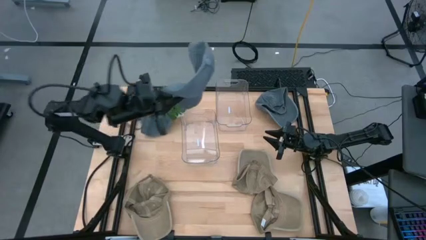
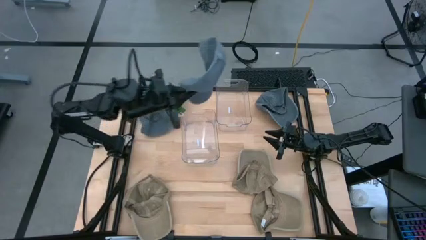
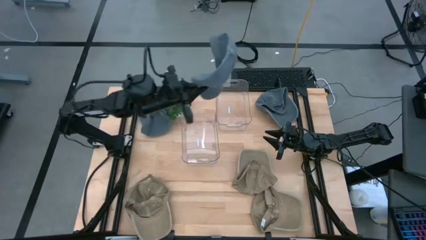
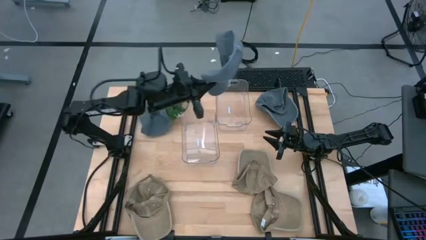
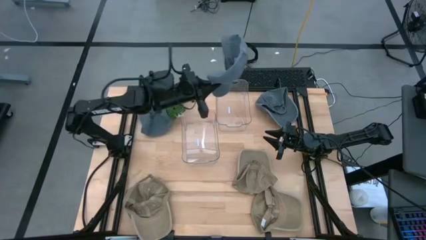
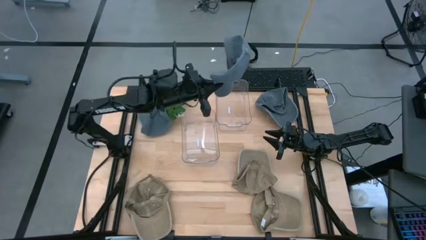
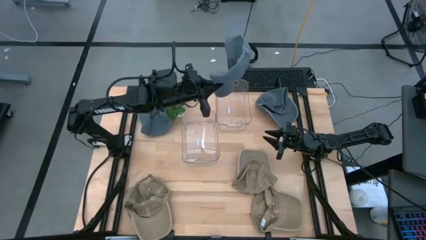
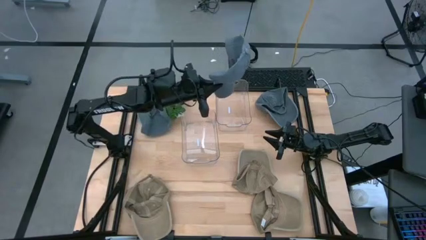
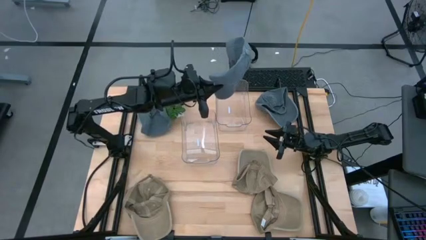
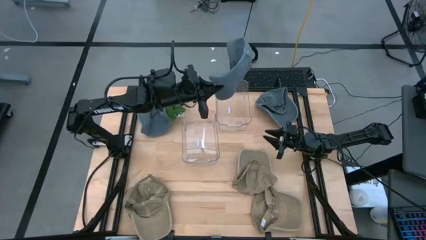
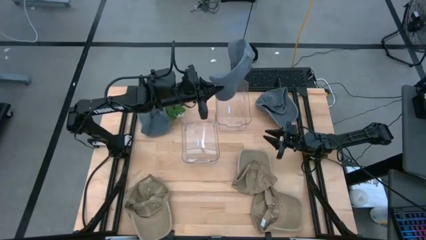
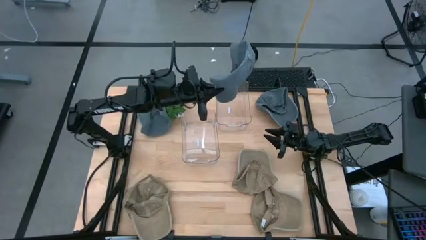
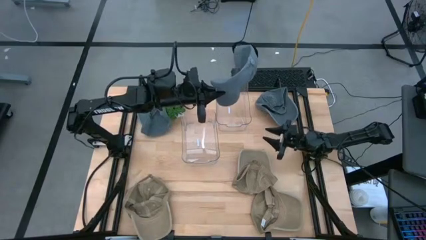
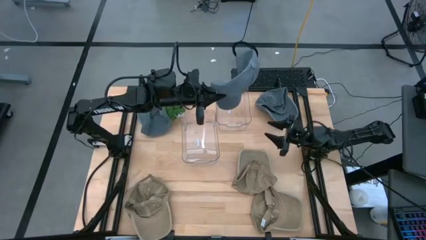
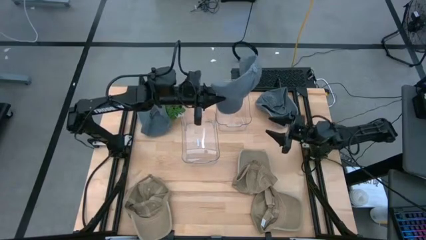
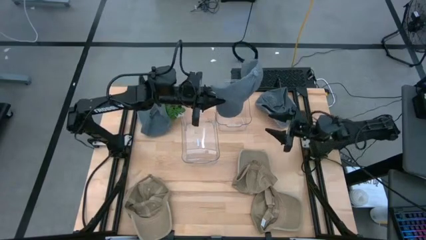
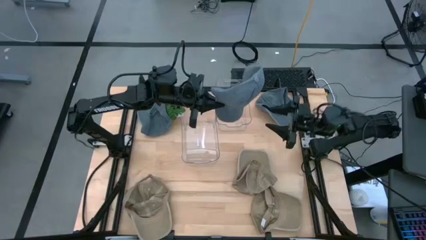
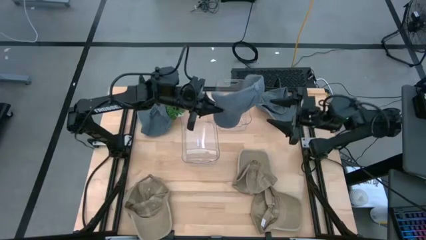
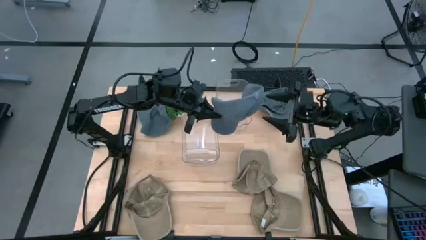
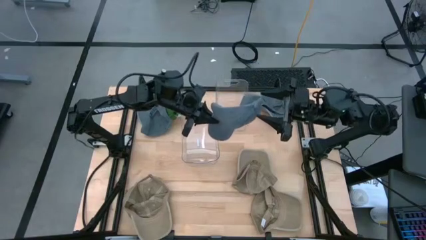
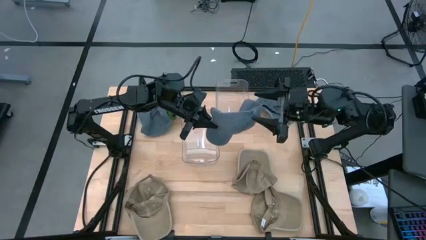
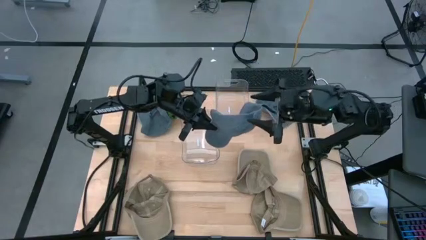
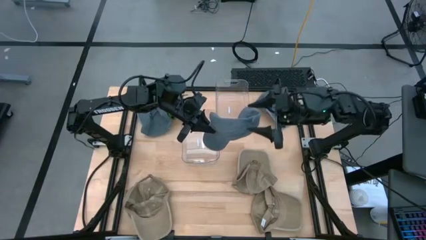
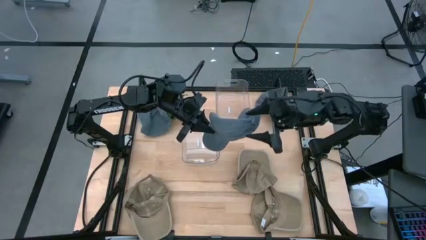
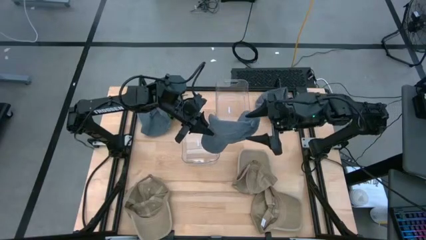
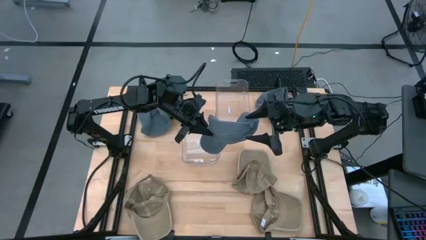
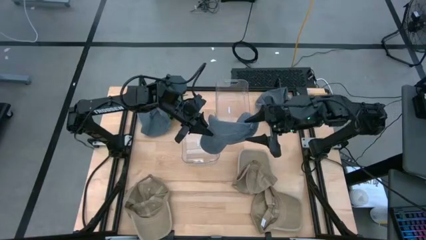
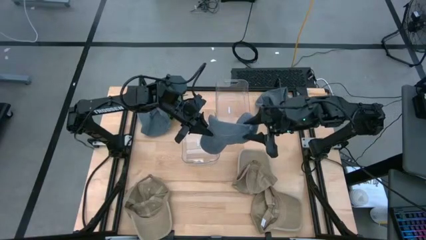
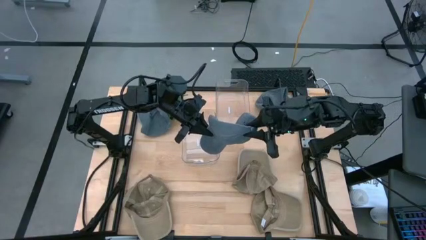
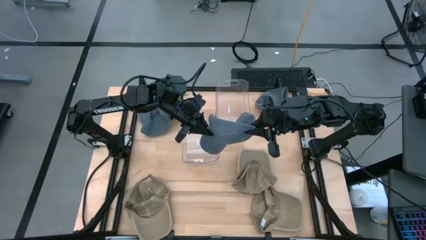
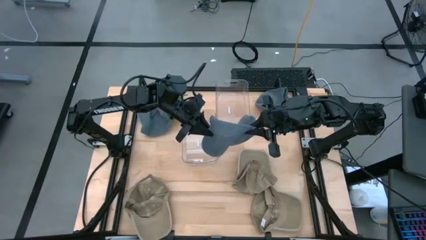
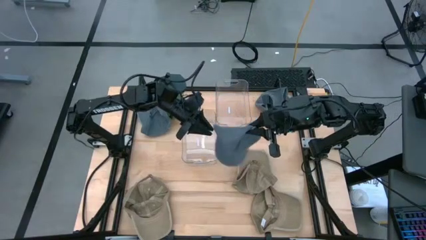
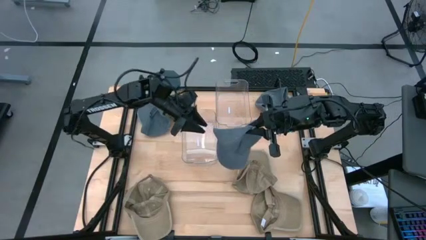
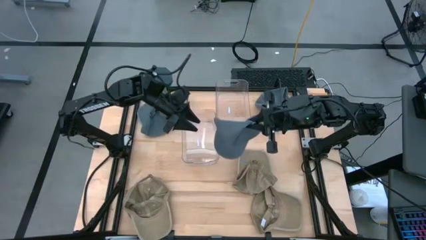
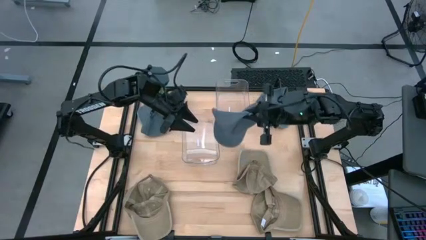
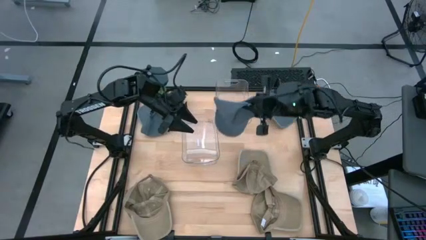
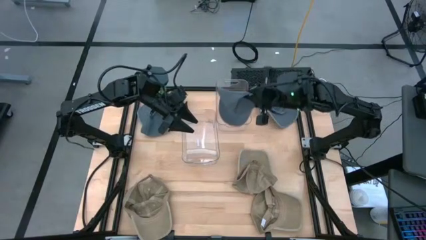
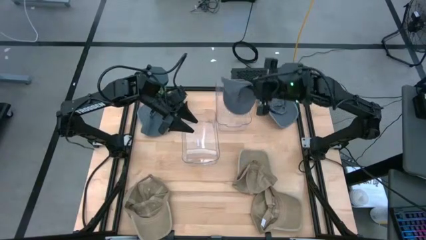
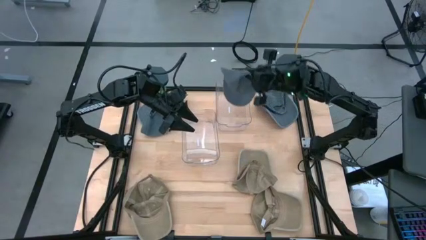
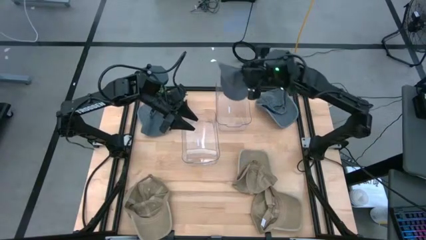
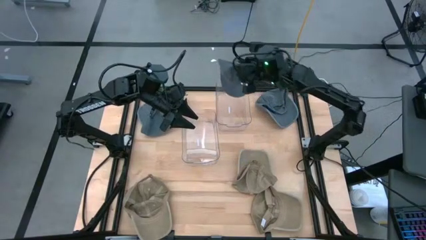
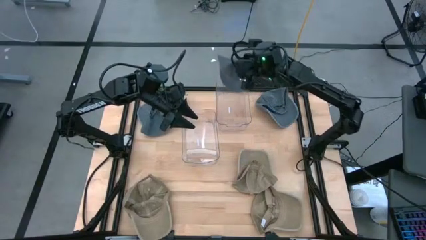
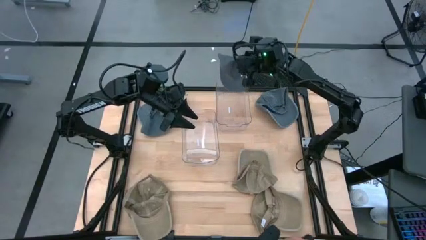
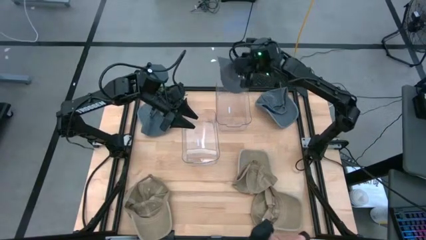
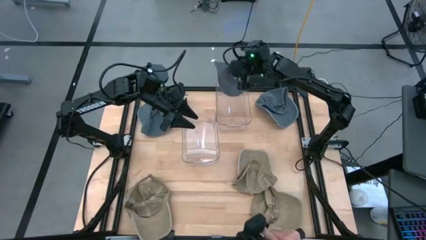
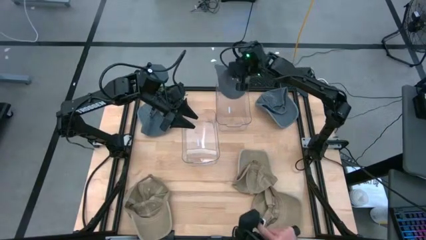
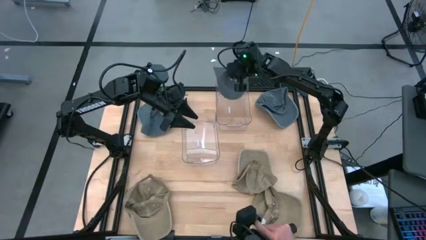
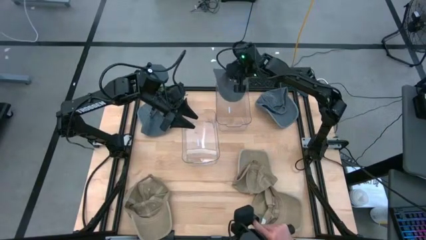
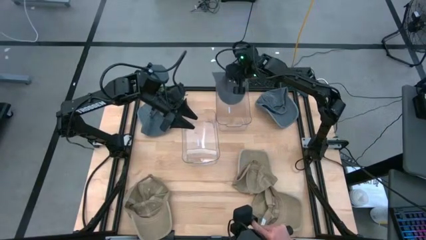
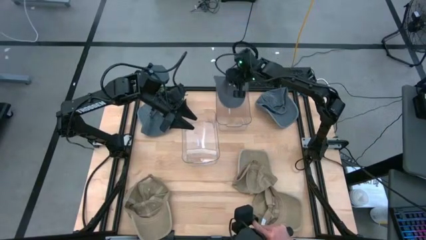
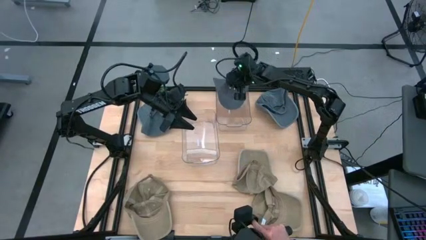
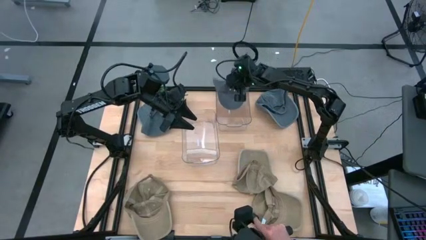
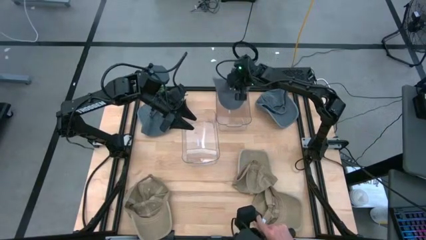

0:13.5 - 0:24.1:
Task: Pick & Place hat
Put the bottom ash blue cap into the right transparent bin

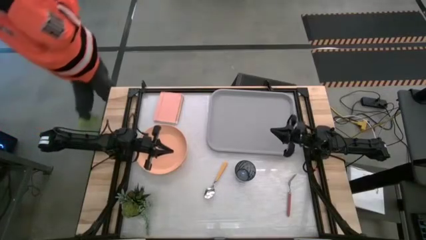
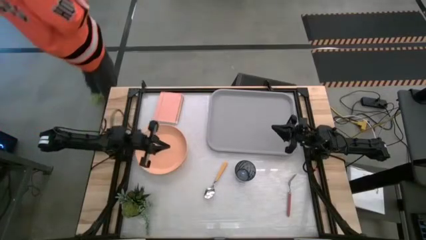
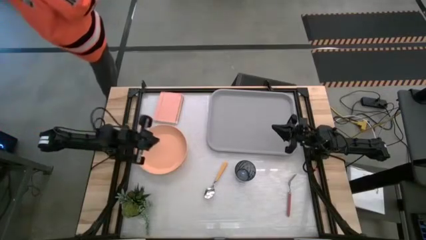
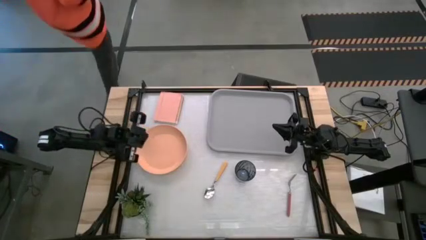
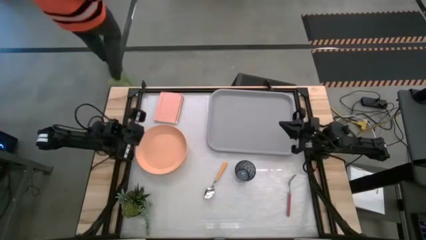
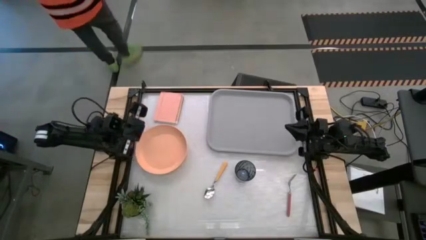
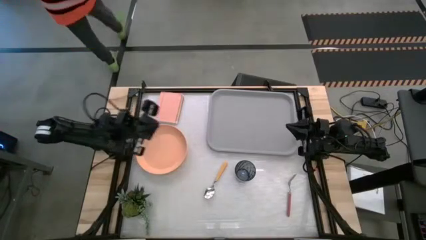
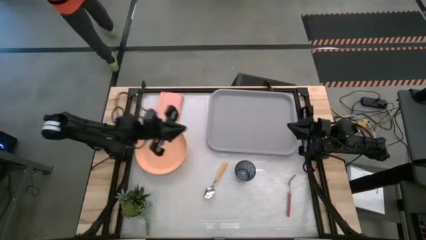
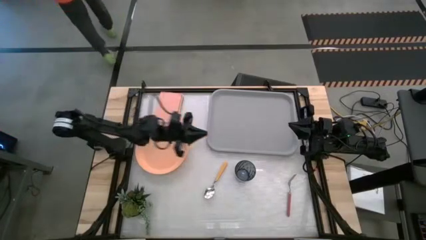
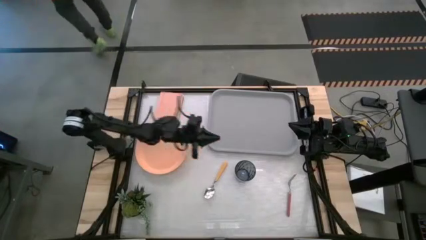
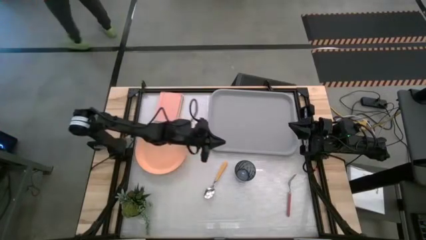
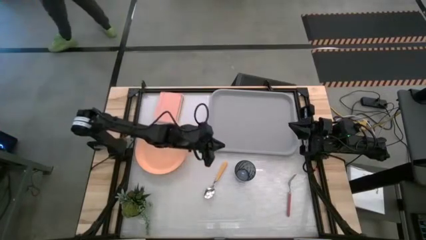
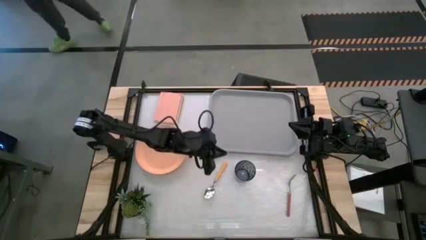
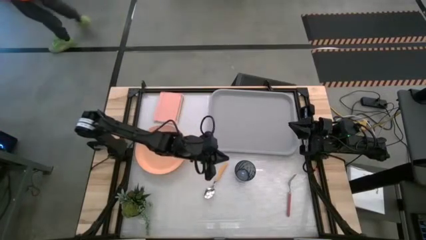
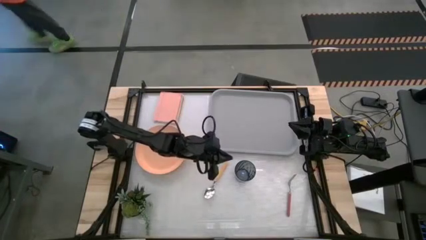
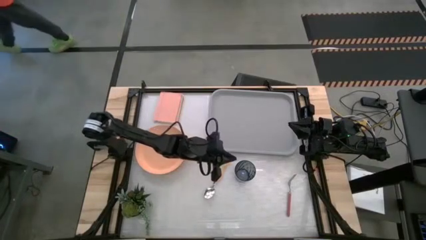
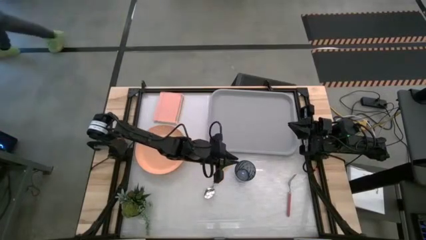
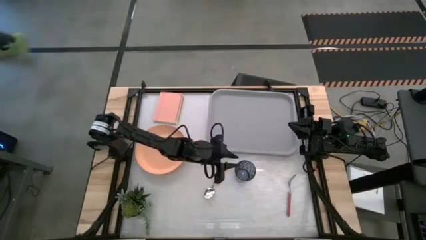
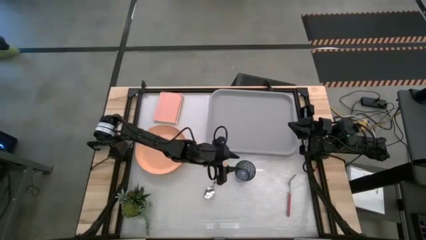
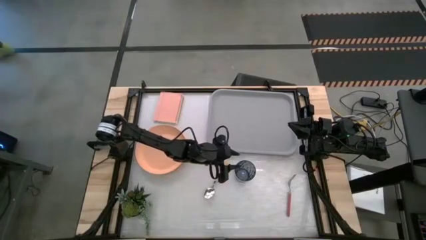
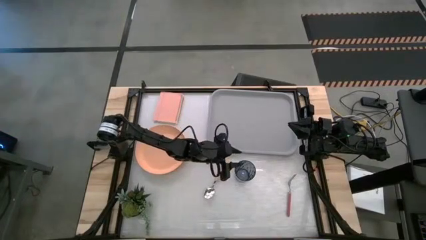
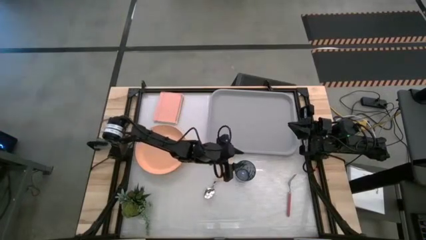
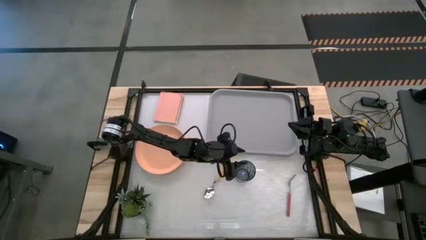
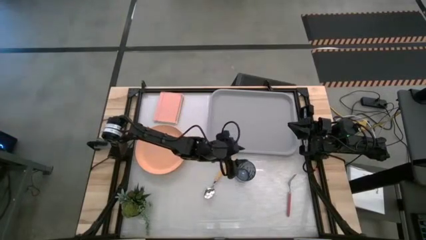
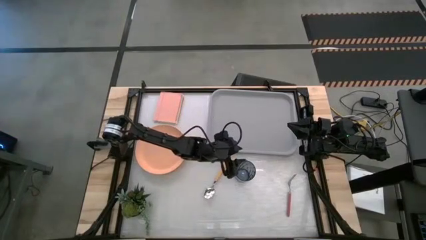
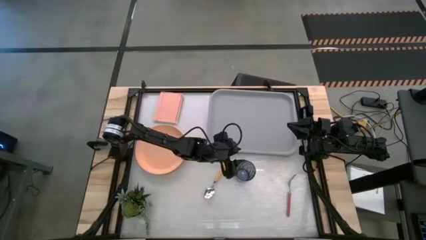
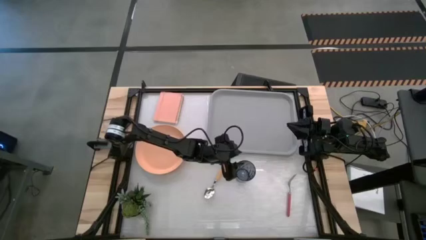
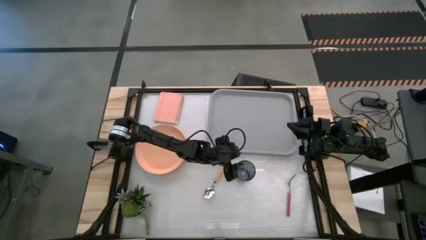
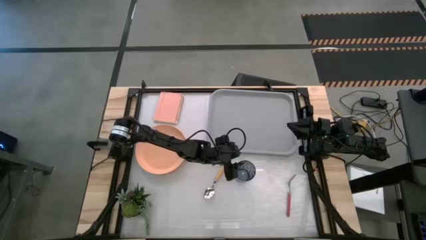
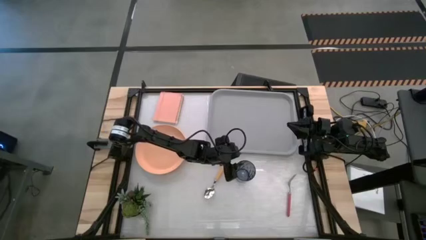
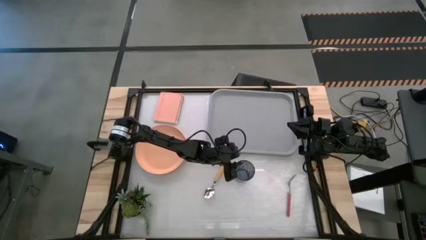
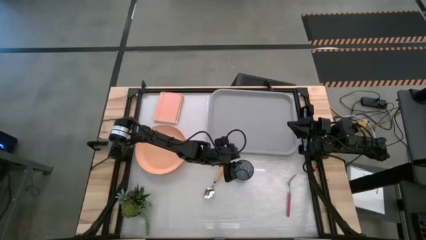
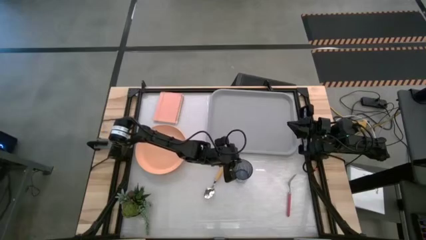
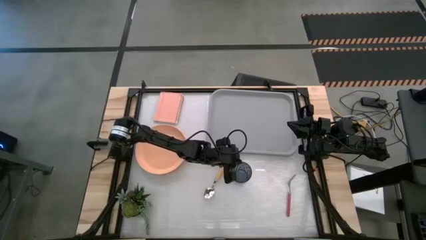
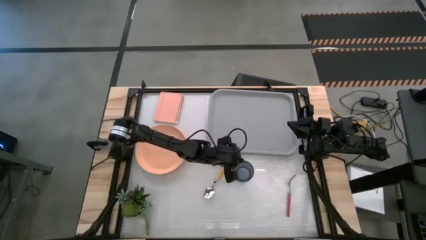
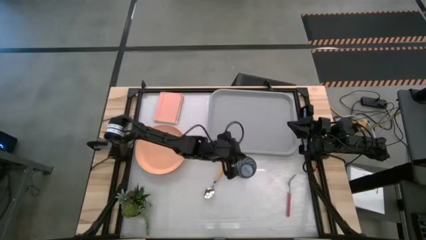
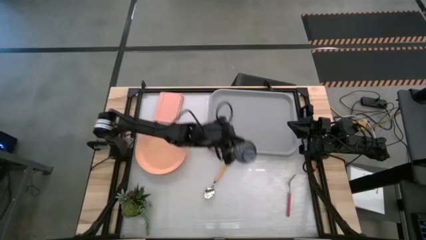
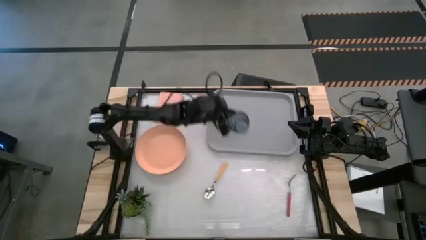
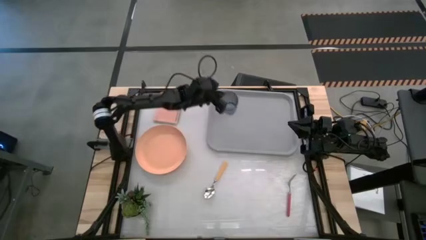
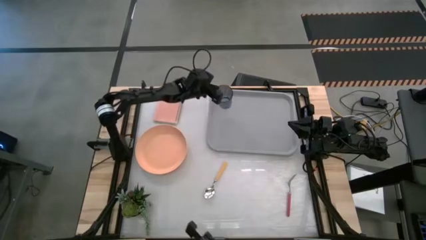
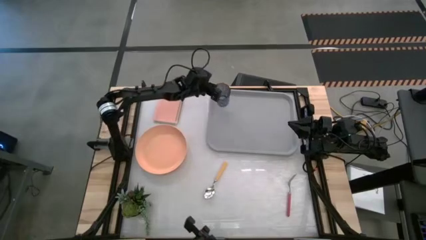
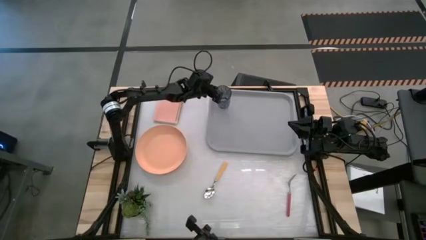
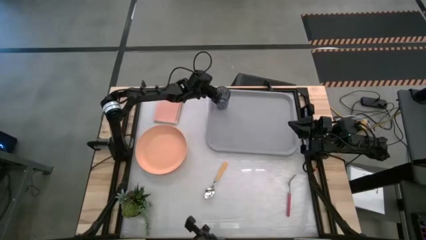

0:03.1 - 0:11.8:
Task: Pick and place plate/cup/fork/spoon on tray
Put the black cup on the top left of the gray serving tray
